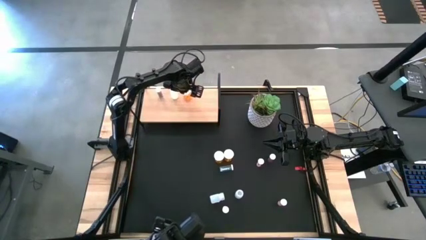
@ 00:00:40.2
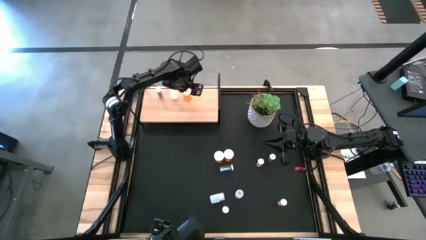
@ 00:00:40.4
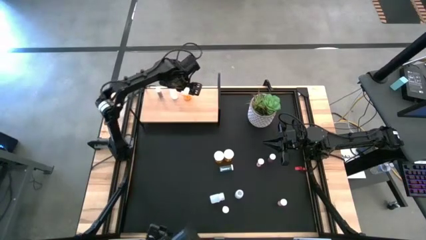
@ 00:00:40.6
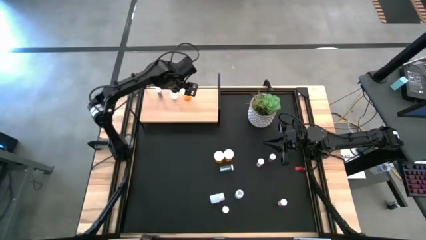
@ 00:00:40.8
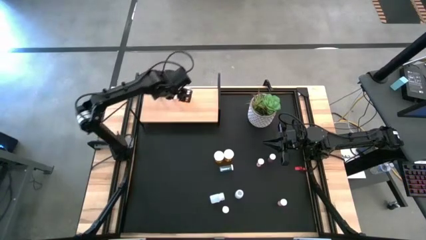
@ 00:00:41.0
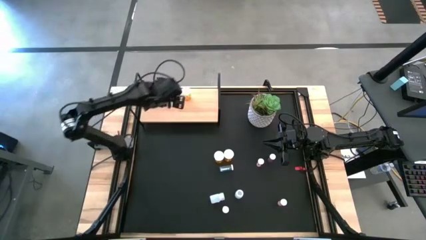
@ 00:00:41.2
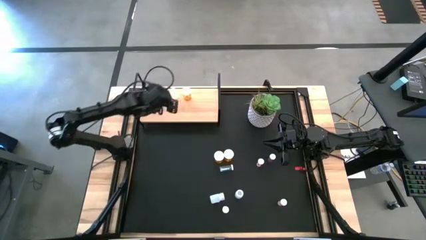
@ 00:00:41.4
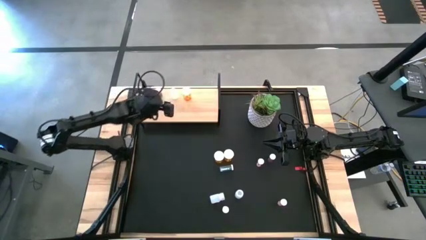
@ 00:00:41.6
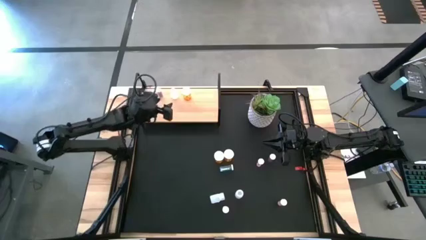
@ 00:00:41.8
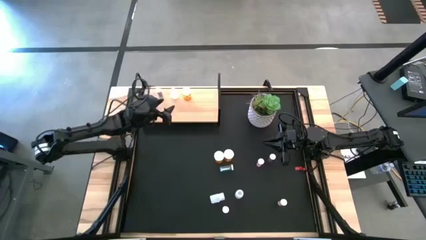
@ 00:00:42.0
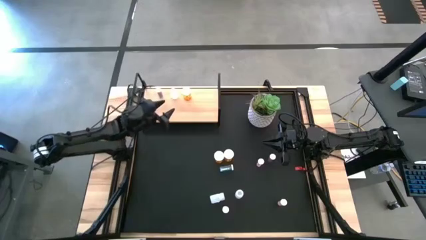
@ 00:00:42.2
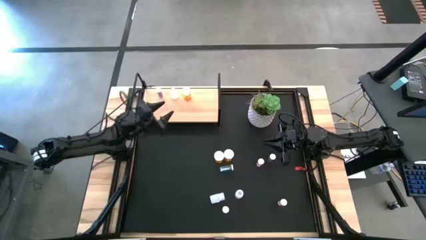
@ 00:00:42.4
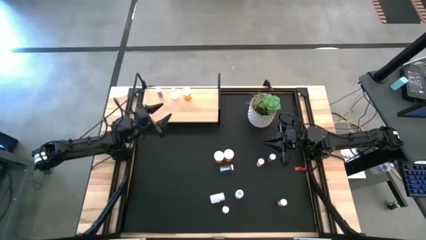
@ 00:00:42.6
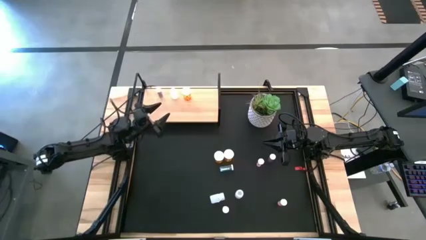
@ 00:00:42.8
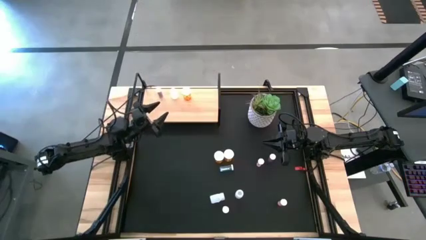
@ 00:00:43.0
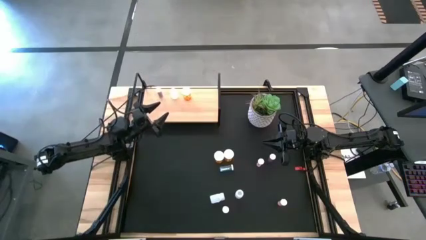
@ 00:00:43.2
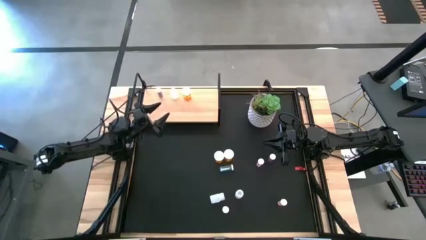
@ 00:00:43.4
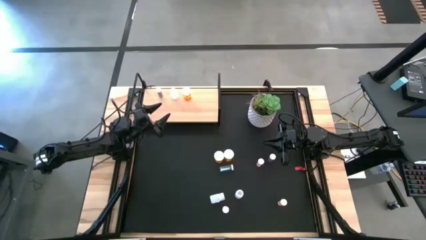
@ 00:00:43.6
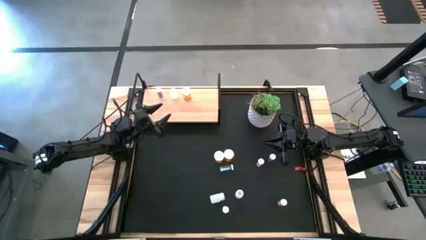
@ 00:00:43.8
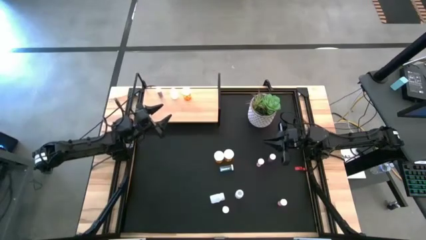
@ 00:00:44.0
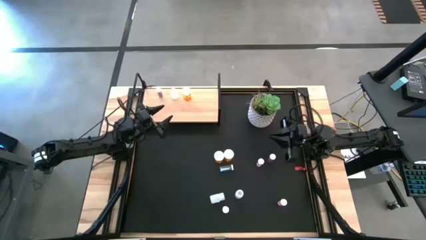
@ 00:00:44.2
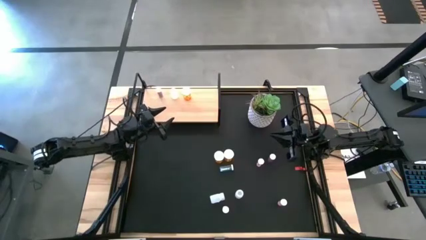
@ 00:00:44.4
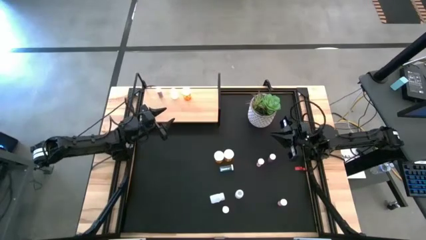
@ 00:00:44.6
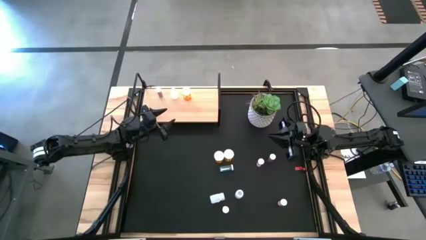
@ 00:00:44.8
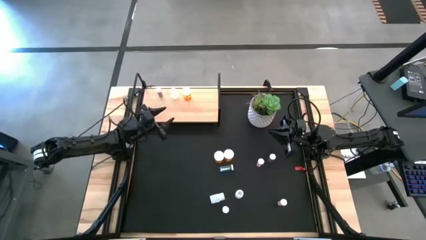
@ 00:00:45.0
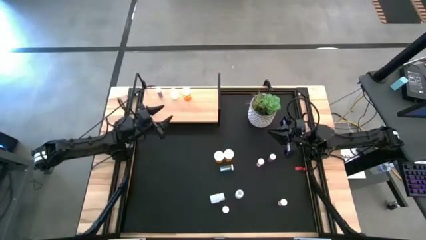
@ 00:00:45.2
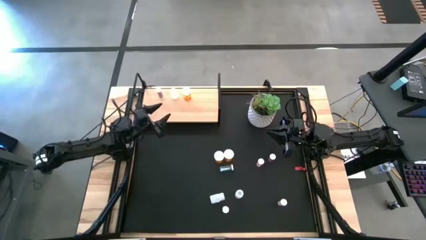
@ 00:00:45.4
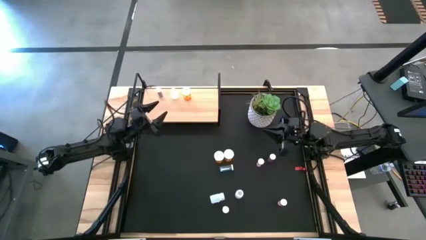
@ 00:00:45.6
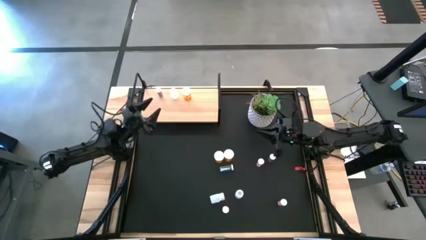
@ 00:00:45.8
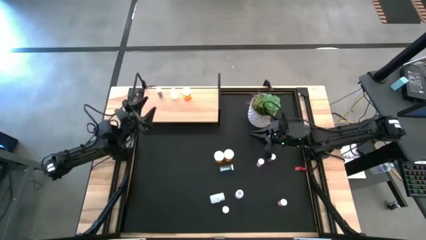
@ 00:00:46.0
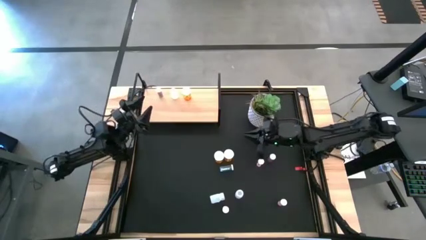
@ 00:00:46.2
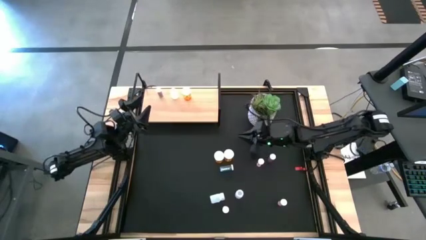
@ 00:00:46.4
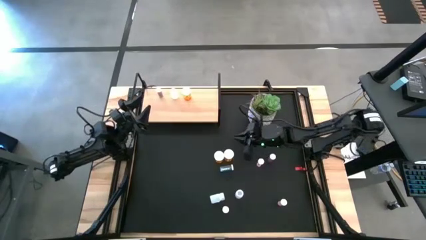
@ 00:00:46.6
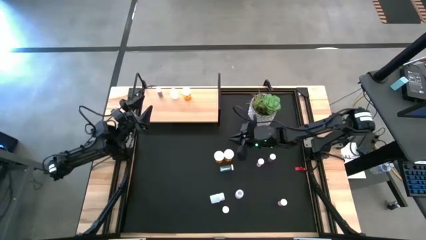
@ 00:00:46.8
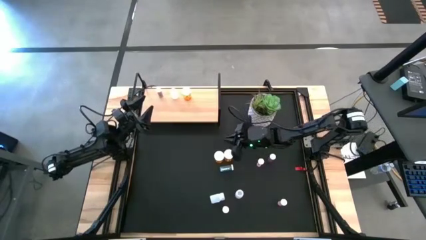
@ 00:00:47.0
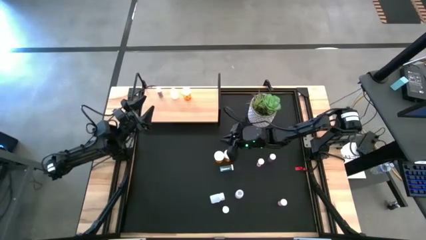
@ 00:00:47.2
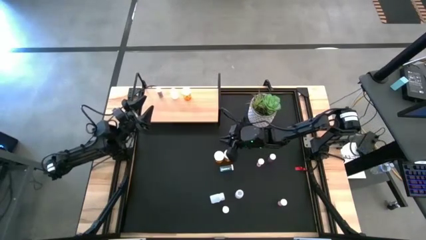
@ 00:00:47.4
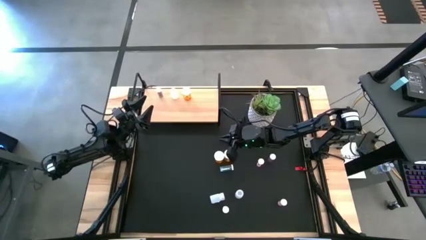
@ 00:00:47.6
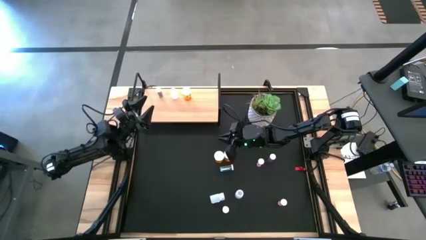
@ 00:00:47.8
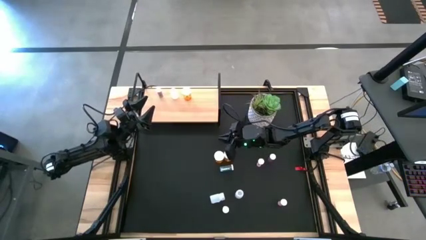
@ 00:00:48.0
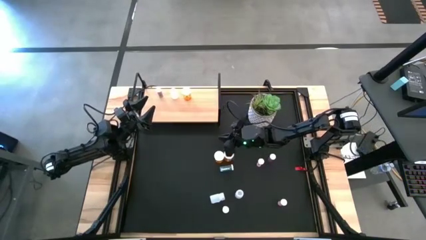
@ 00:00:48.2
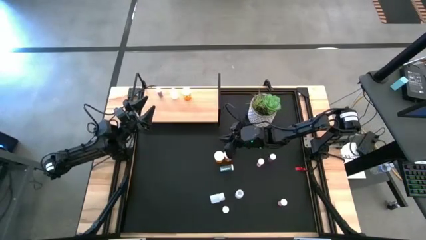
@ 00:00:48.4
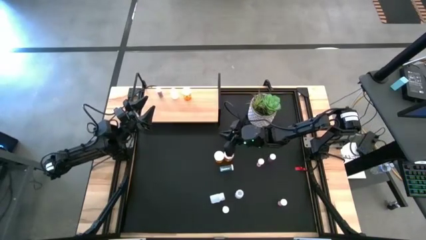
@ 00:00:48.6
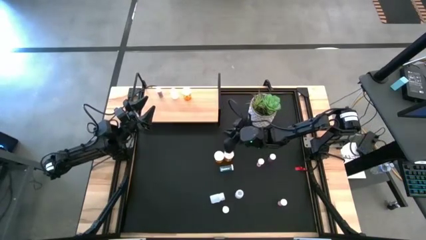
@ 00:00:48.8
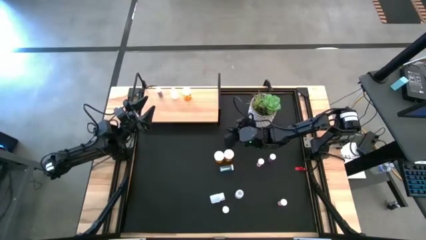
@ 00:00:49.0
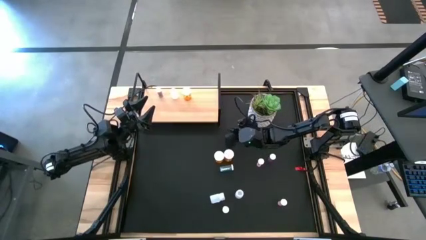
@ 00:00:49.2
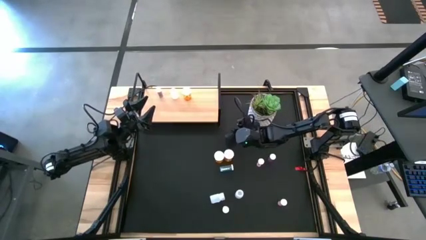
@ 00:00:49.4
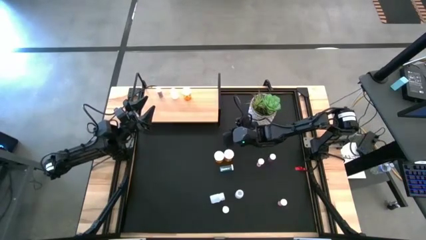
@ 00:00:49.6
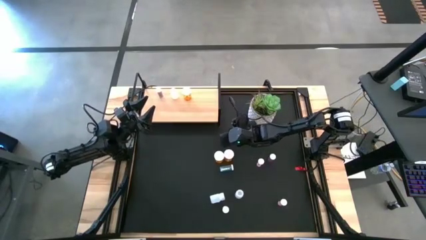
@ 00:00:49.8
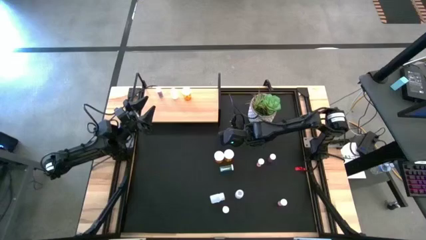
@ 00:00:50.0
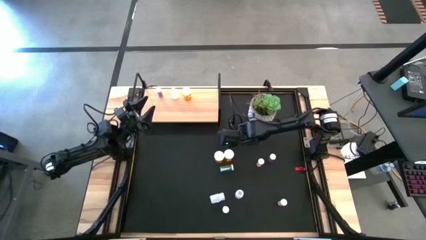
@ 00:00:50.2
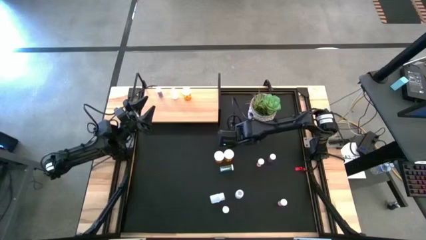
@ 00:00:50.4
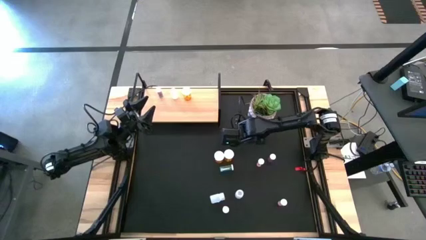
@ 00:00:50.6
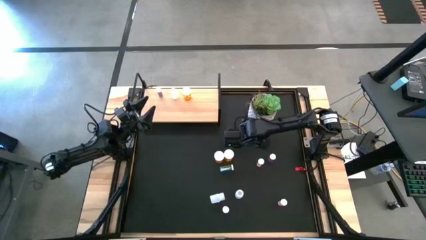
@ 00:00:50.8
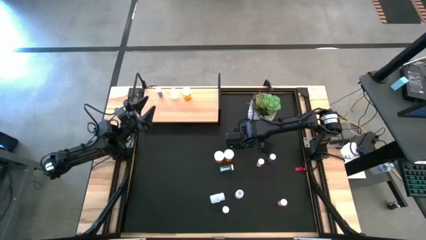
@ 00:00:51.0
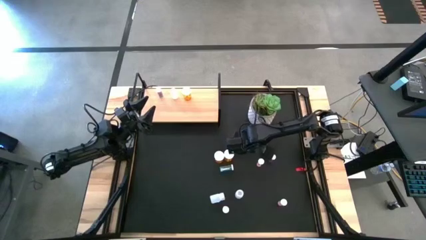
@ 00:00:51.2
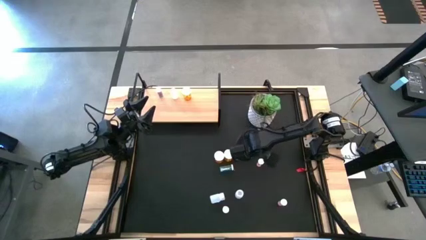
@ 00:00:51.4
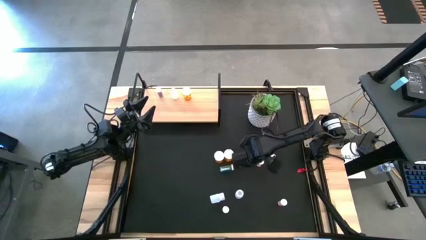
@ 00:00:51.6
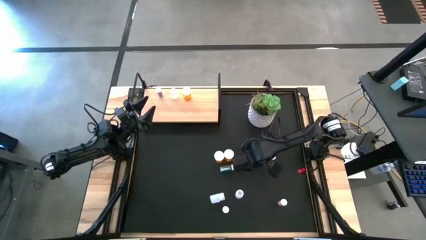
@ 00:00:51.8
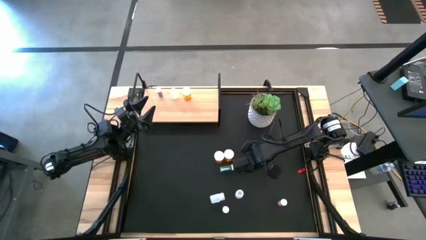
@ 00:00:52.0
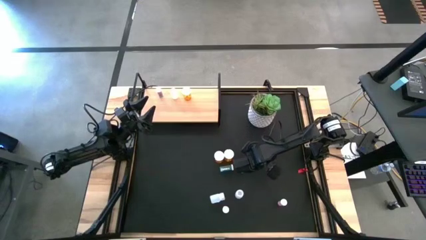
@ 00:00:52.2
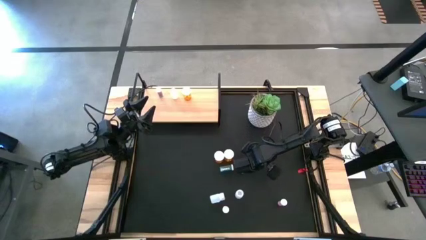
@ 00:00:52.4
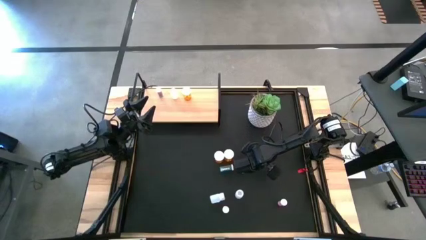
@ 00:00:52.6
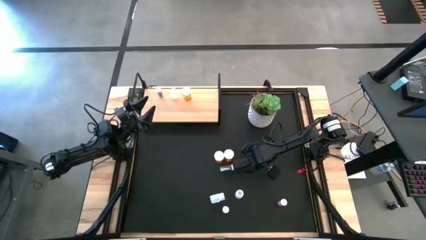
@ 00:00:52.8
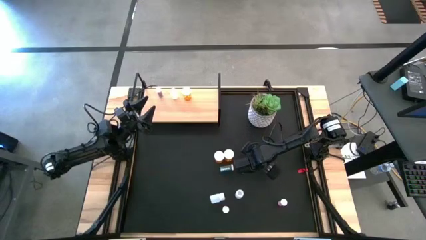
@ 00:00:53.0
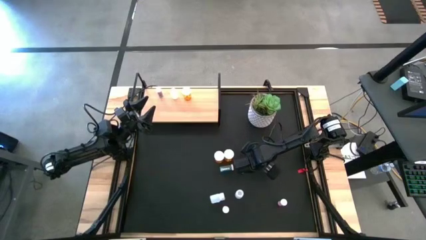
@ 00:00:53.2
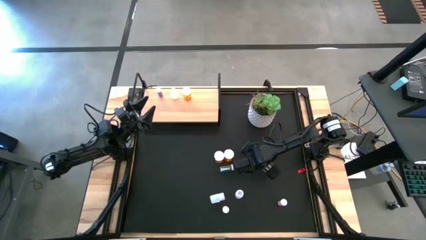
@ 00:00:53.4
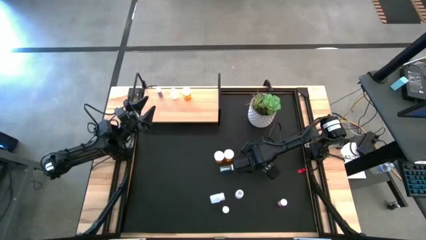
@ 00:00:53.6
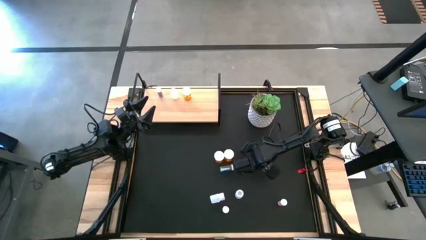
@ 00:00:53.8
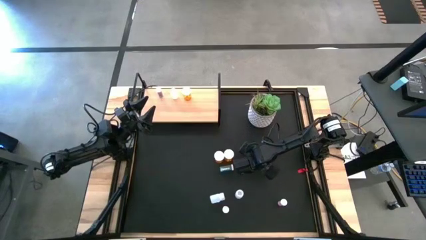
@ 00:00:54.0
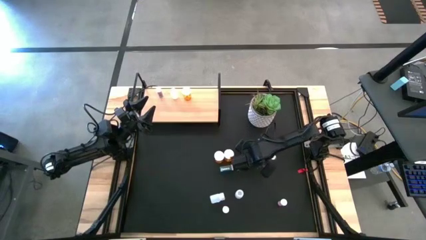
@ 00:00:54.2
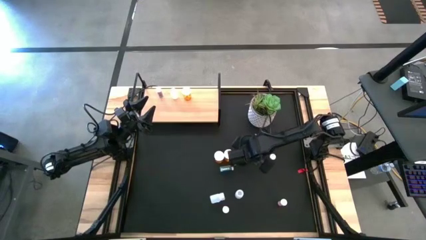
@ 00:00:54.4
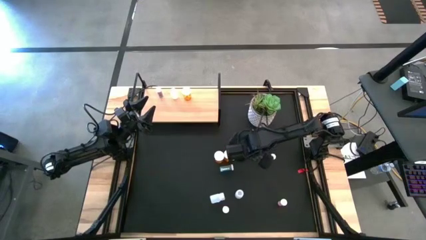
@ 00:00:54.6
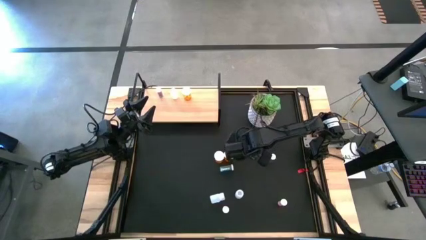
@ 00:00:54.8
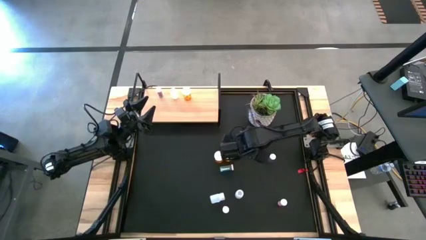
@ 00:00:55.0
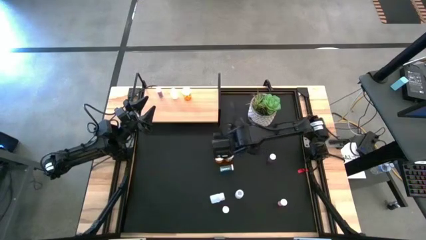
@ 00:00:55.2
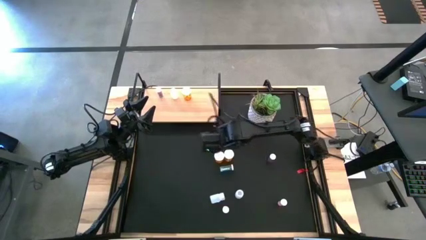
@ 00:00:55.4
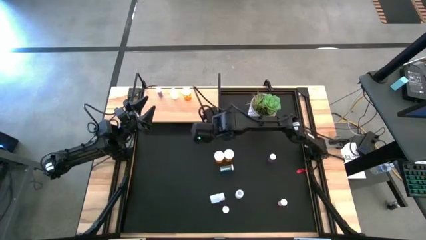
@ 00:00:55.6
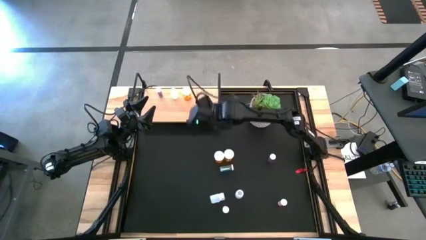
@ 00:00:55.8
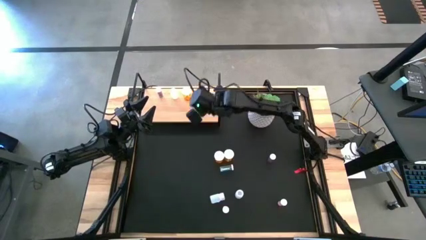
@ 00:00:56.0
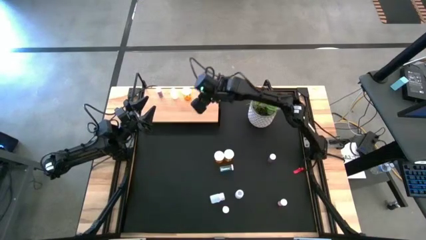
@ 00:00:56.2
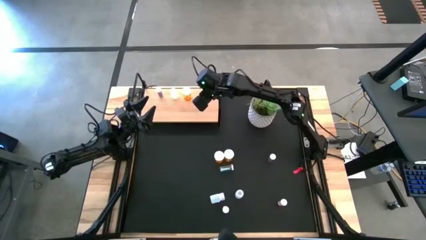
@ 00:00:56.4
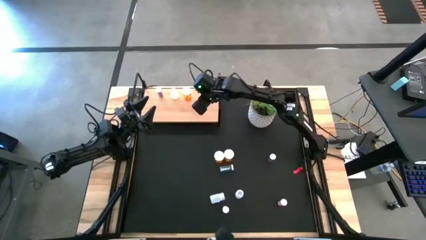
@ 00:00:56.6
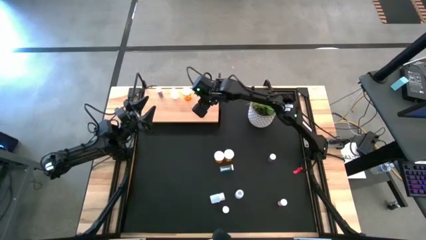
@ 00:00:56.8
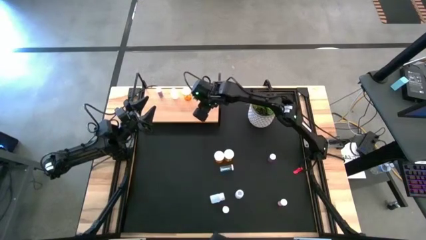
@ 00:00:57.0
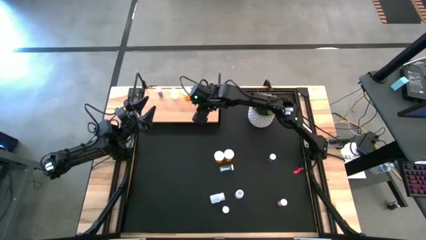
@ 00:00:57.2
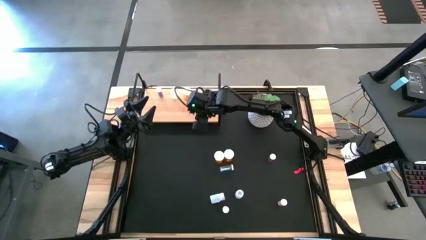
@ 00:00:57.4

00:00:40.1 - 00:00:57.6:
Task: Pick and place medicine bottles onto shelf by color
Put the top pink pill bottle on the shelf
